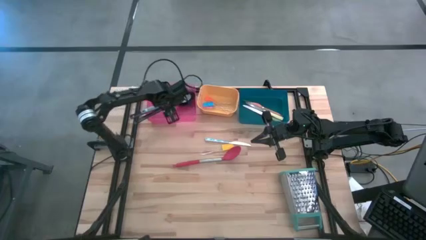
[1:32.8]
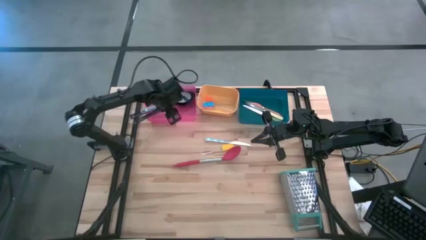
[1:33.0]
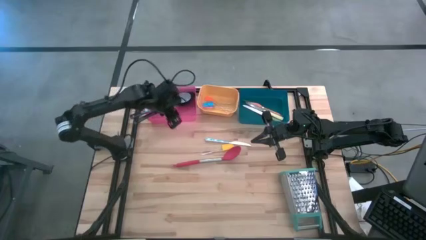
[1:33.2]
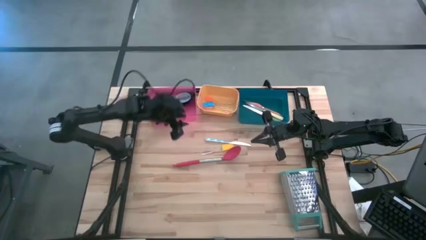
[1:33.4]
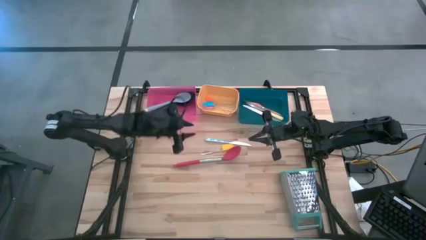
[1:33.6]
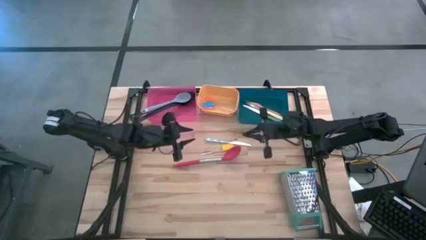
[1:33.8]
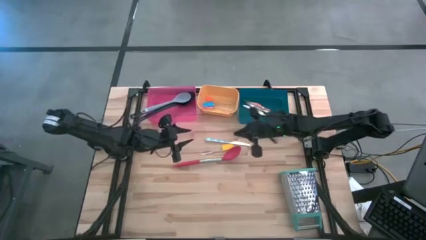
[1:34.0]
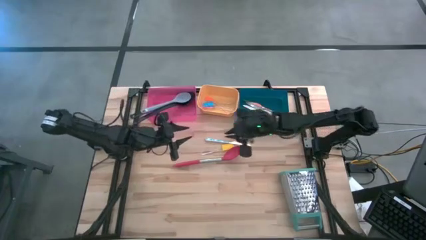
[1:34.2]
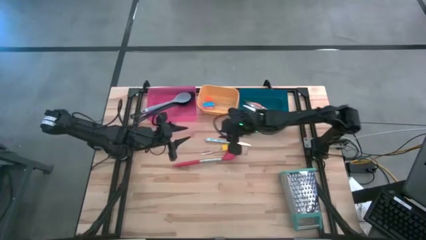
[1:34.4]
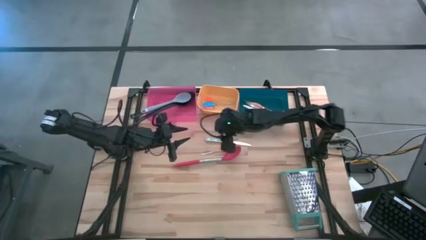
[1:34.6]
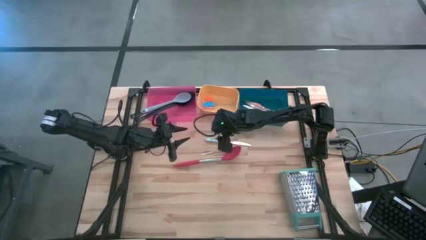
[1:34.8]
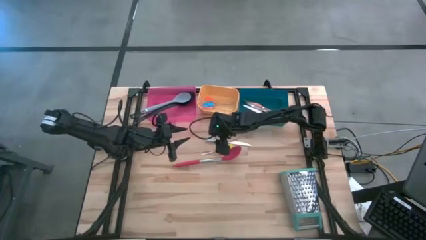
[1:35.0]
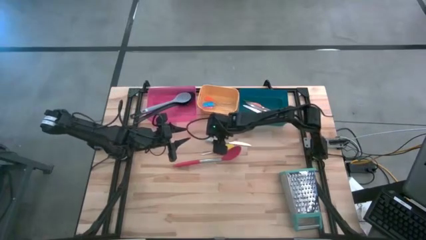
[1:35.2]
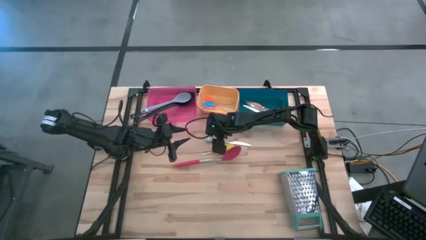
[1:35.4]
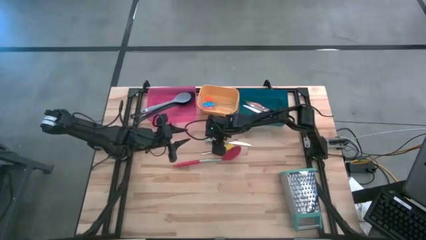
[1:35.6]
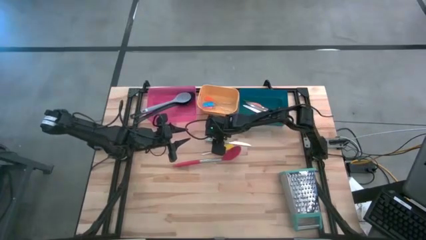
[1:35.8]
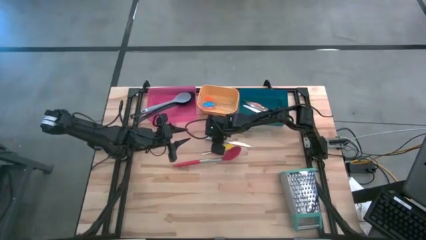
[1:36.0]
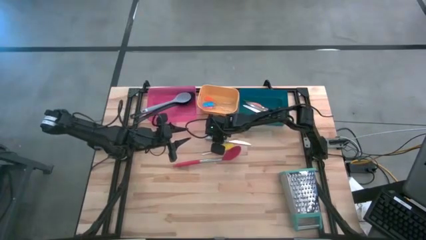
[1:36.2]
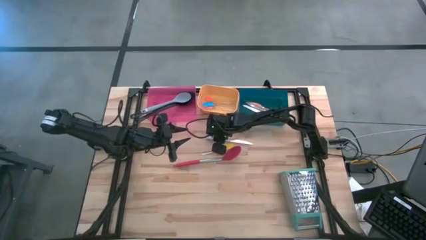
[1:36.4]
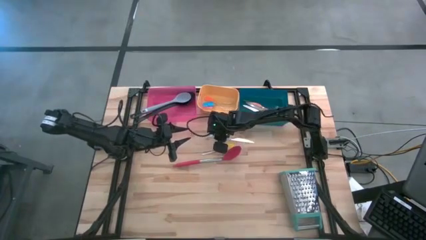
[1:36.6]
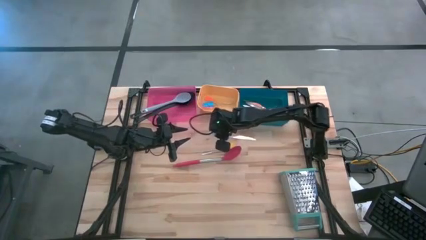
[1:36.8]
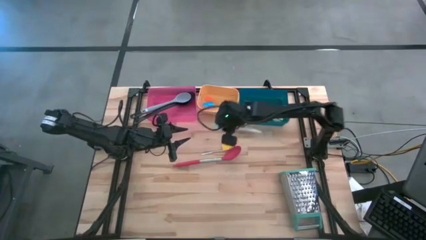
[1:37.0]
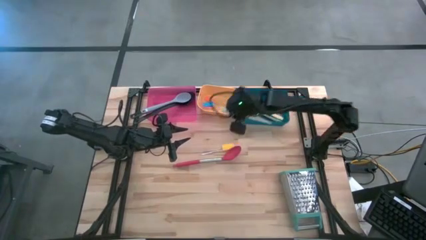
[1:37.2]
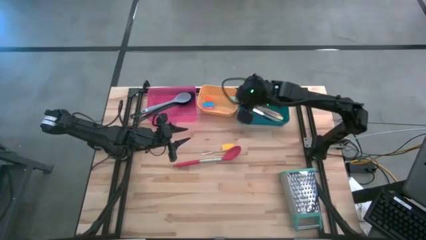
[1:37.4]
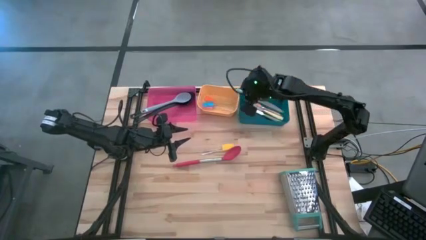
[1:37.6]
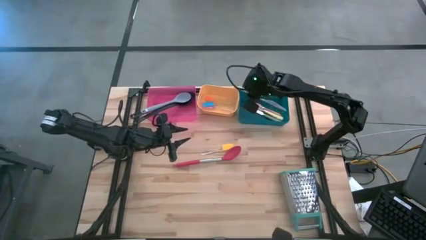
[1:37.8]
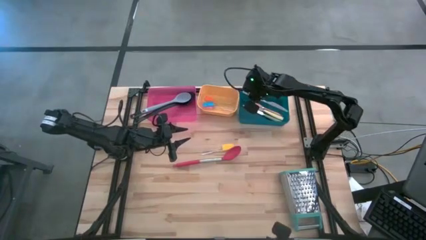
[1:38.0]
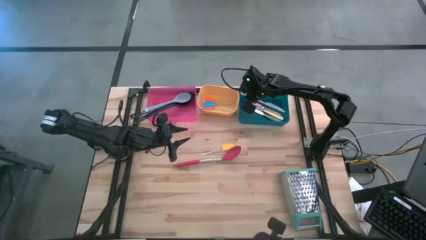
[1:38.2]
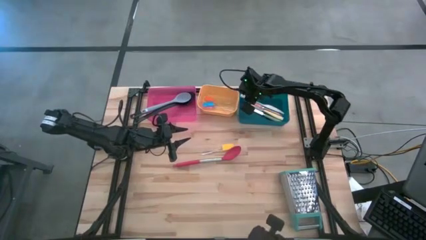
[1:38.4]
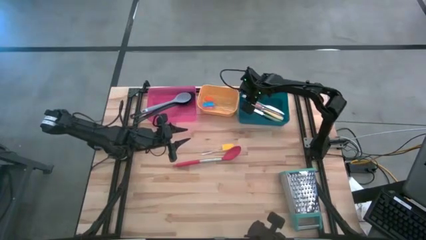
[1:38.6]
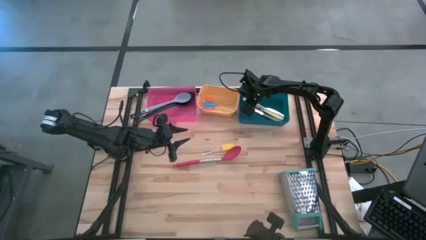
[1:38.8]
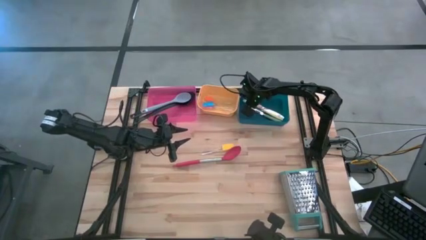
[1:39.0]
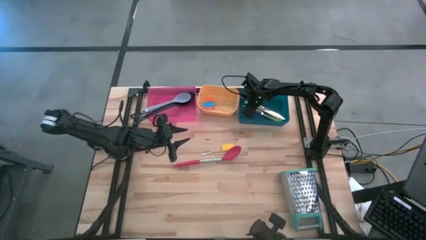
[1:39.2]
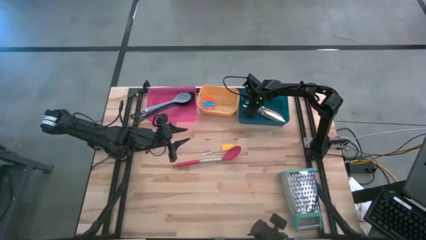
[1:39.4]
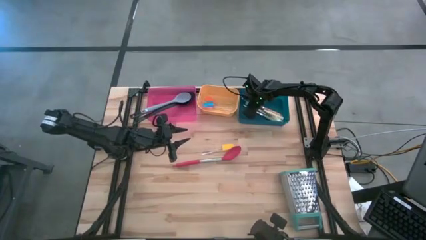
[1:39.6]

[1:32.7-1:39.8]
Task: Pick & Place Kitchen Items
Put the blue knife into the blue bin

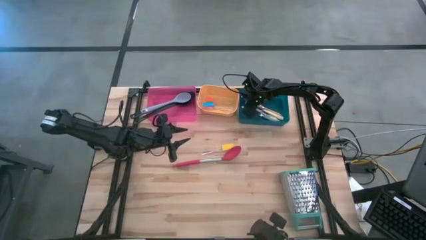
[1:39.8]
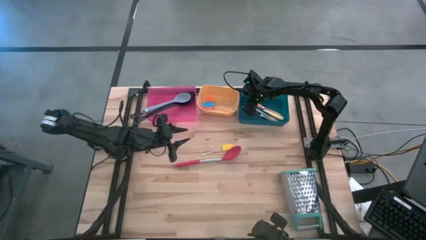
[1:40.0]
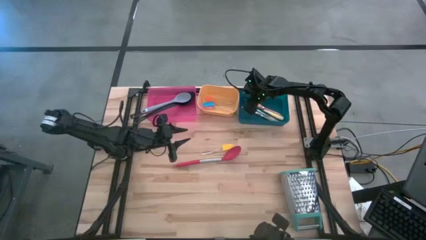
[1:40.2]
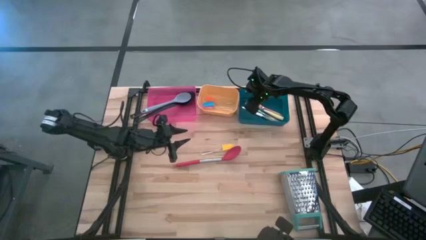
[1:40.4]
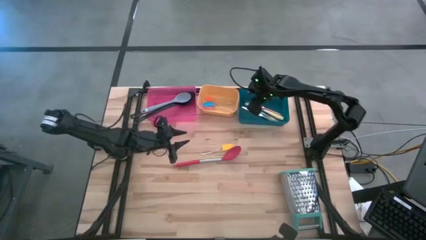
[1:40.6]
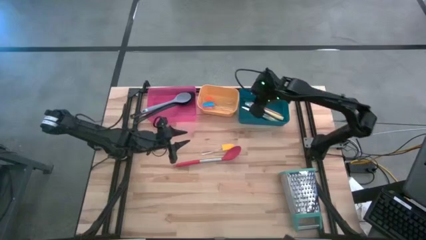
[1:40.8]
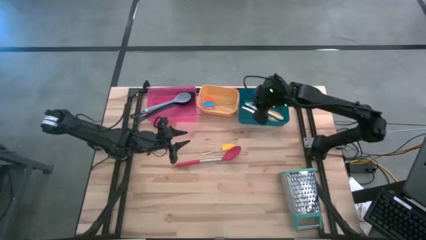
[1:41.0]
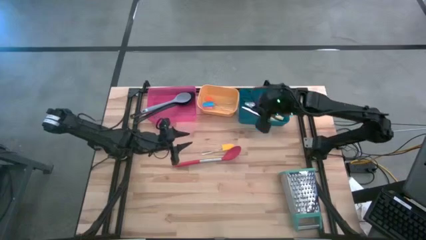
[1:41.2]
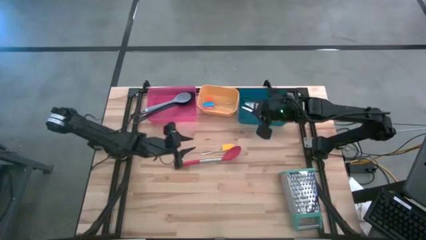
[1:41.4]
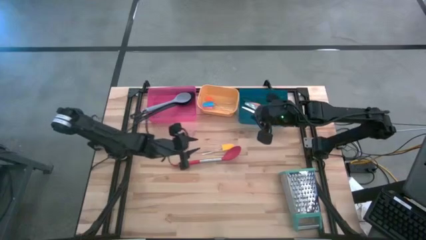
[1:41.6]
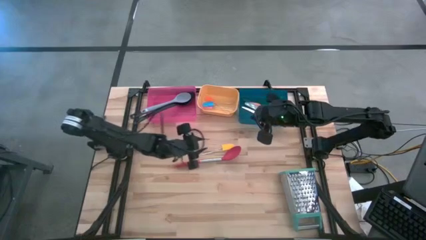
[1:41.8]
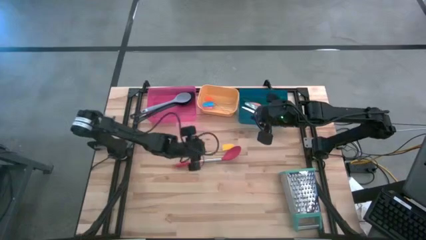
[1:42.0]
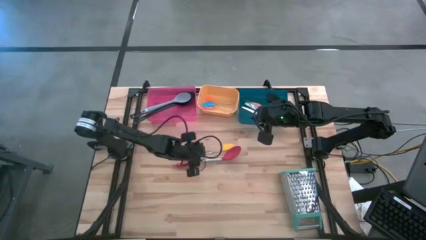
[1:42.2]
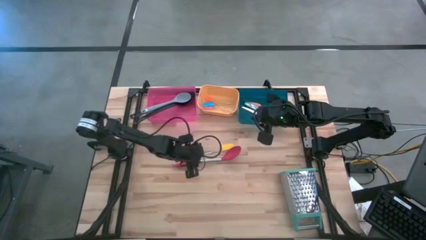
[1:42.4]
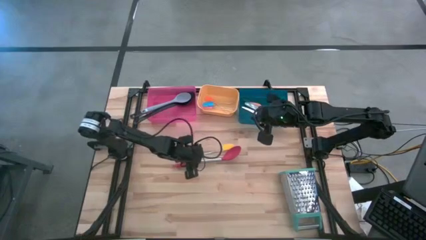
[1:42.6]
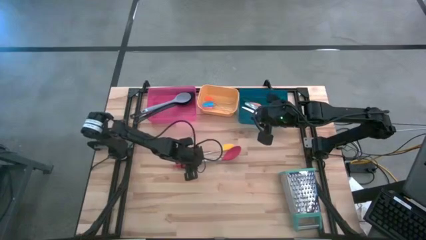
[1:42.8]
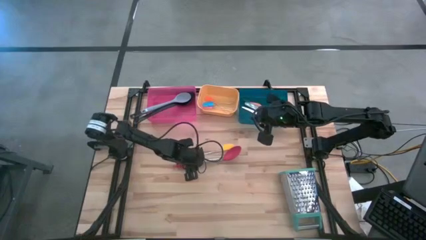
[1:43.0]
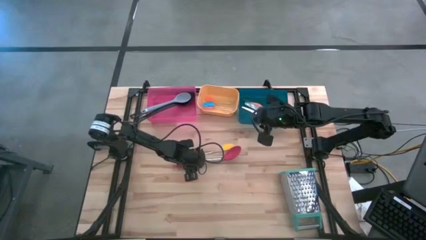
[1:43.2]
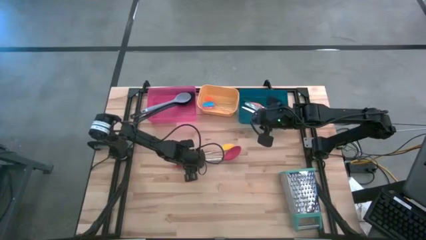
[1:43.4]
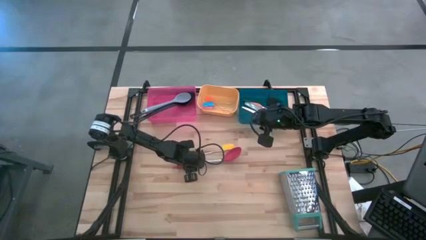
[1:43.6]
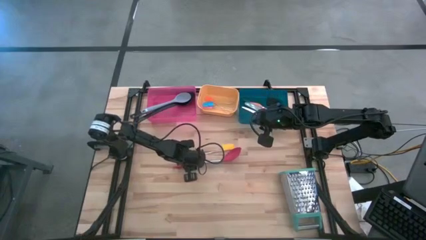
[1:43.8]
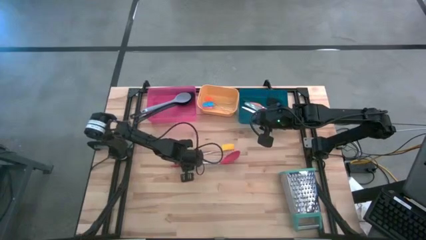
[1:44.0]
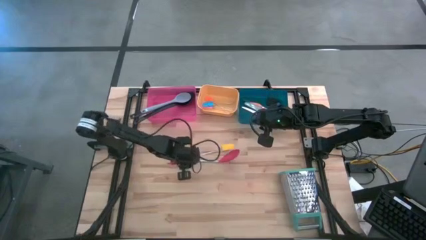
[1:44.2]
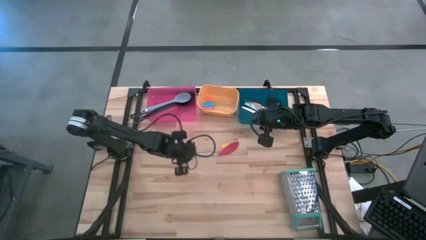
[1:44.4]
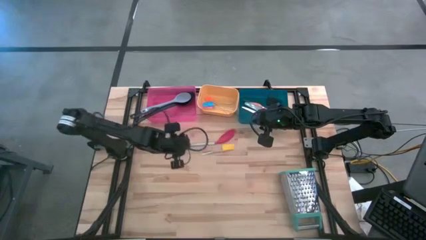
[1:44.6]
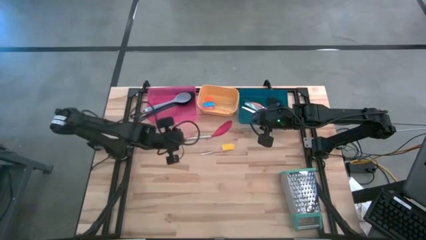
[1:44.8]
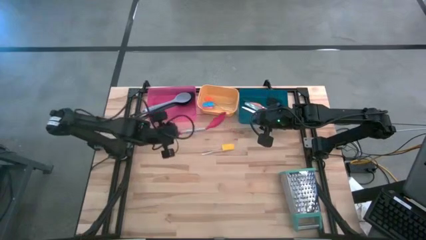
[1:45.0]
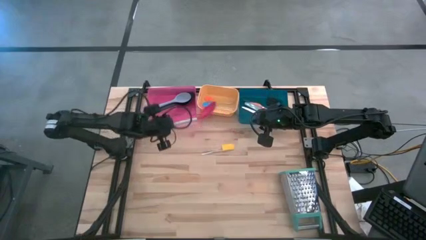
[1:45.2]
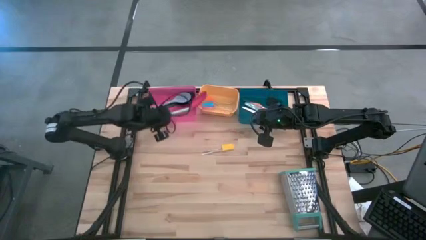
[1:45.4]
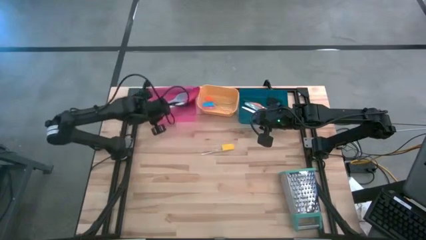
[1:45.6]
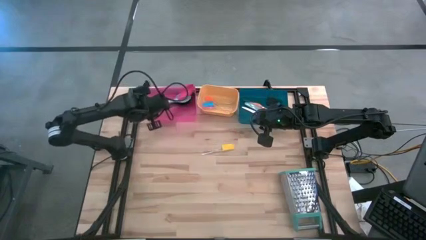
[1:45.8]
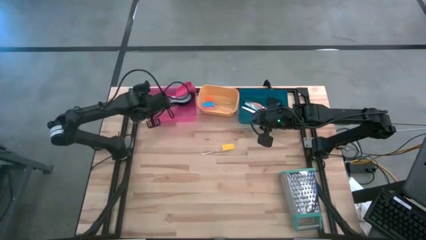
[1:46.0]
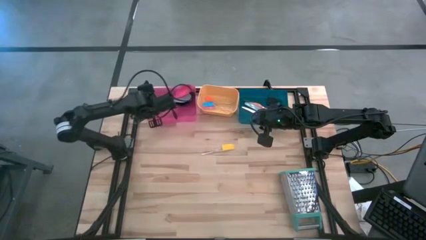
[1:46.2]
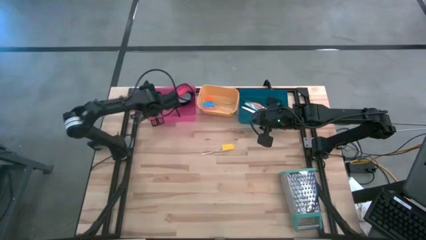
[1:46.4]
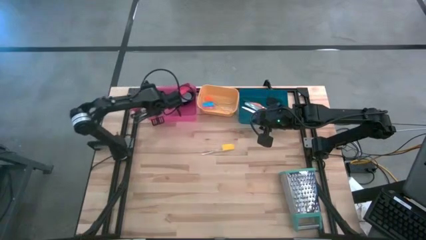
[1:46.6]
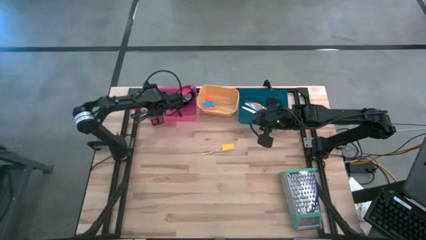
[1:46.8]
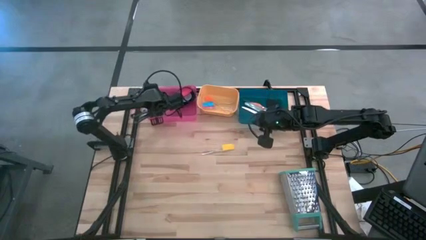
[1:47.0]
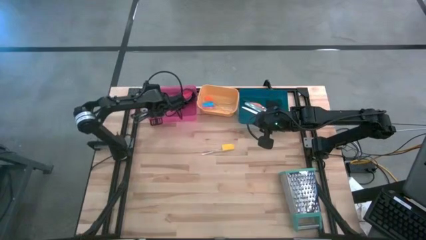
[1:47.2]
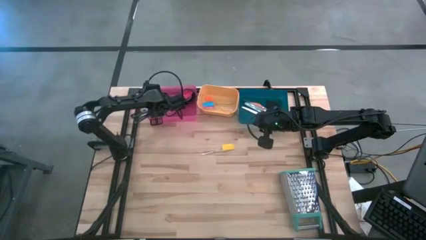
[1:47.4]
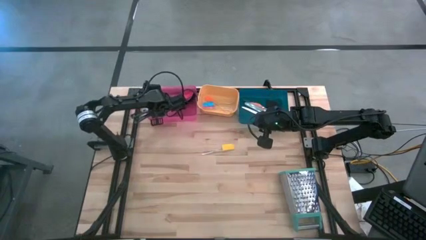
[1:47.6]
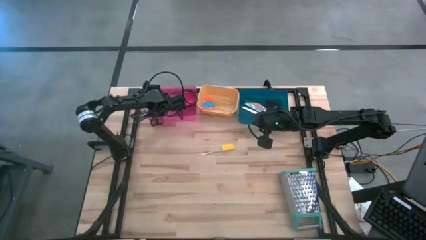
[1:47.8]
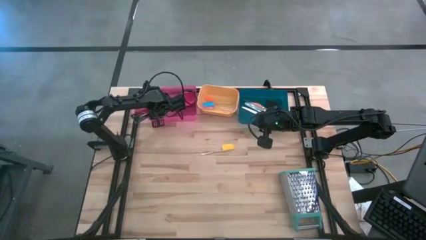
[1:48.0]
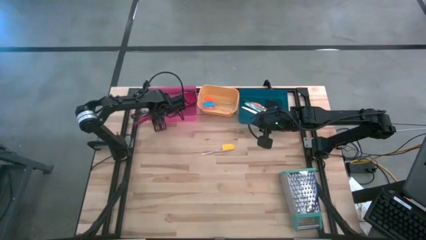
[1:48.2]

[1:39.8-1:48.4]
Put the red spoon into the red bin

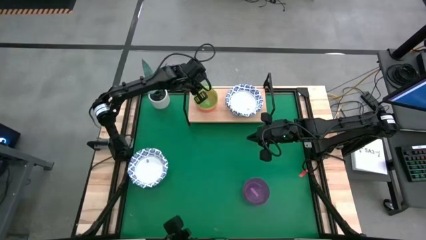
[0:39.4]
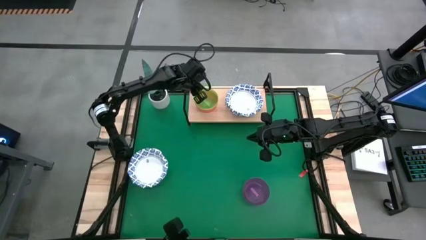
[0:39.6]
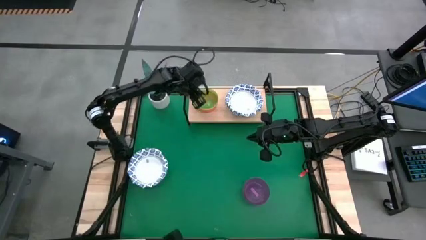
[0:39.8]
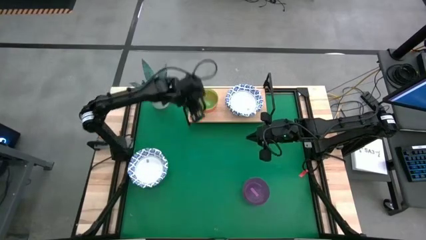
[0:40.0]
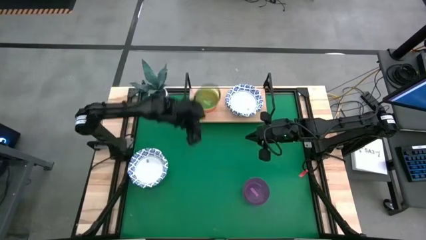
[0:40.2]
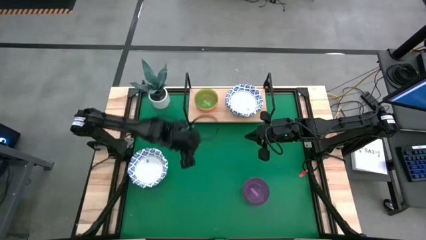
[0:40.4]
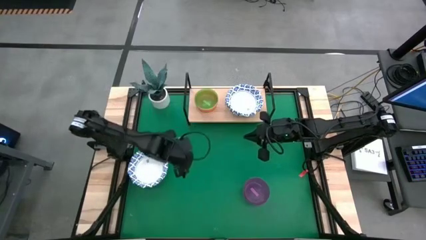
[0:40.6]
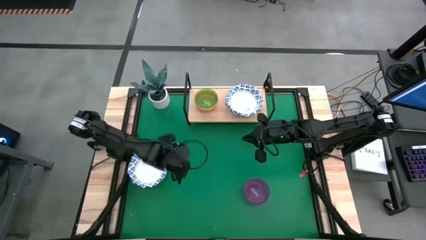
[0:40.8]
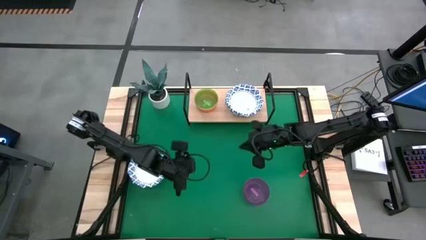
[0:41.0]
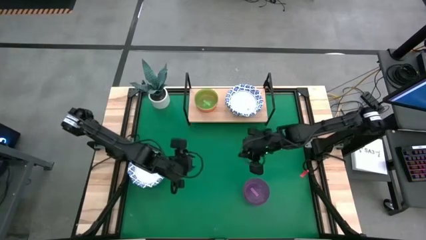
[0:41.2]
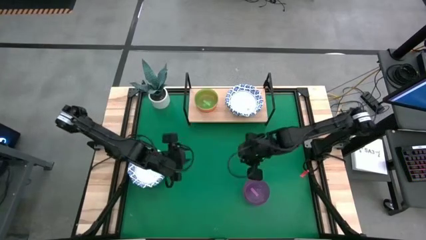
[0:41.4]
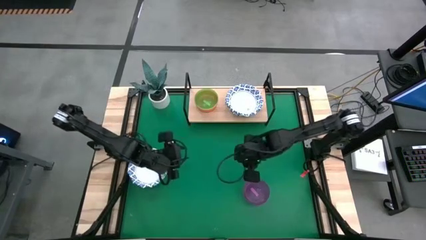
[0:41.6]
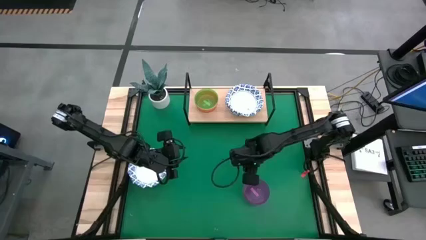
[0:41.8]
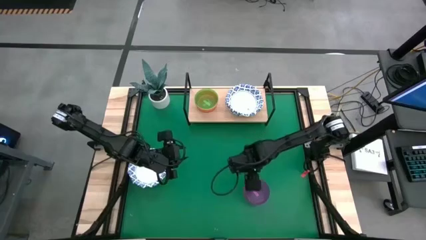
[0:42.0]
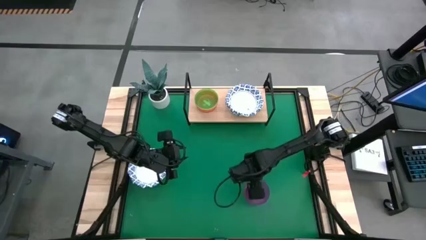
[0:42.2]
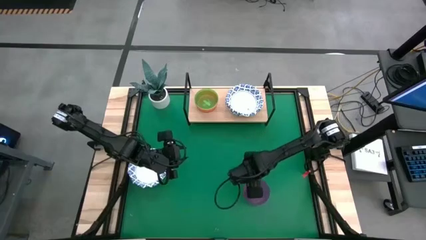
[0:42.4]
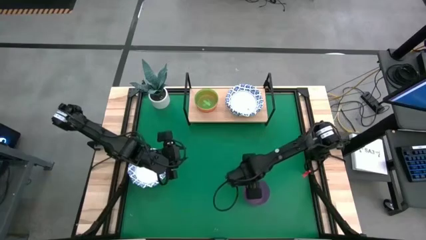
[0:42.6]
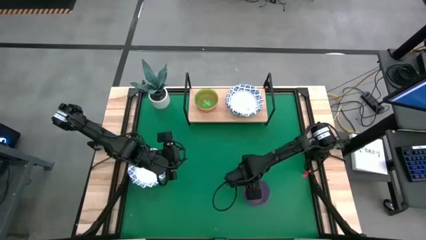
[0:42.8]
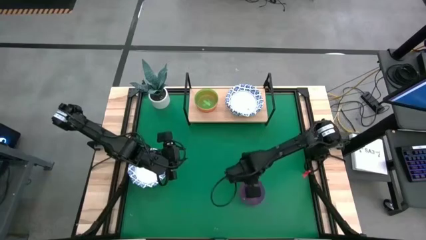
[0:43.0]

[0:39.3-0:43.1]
Task: Place and stack bowls onto a shelf
Stack the purple bowl on top of the green bowl on the shelf
